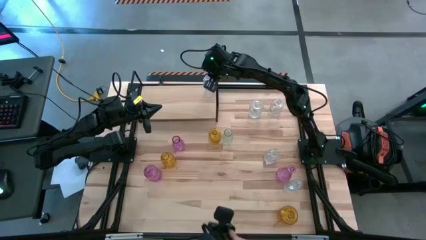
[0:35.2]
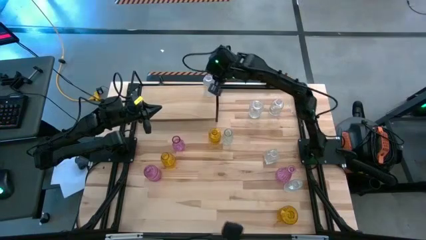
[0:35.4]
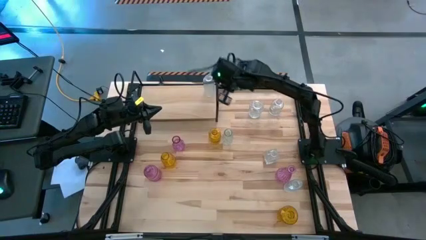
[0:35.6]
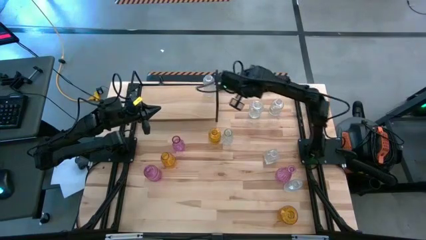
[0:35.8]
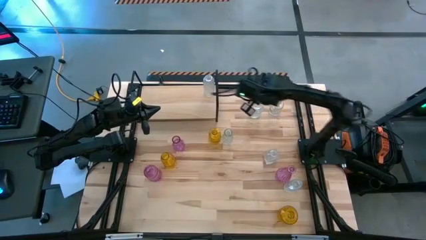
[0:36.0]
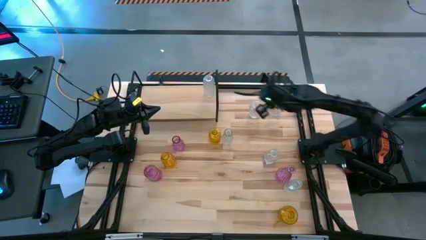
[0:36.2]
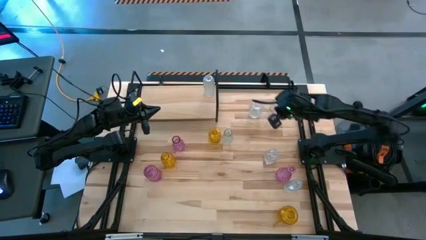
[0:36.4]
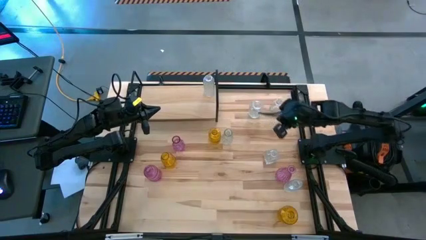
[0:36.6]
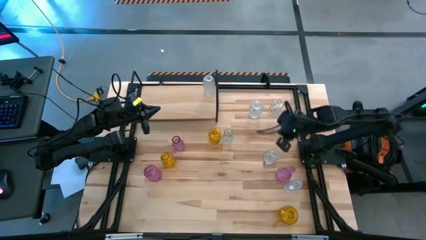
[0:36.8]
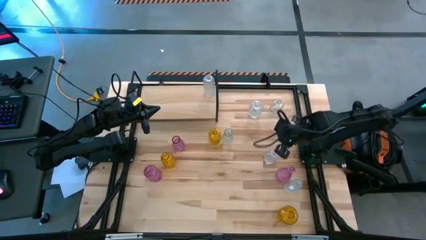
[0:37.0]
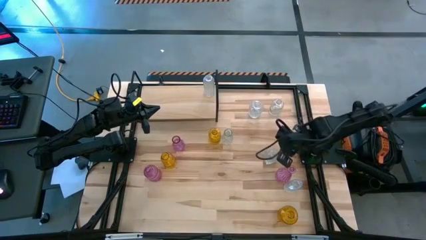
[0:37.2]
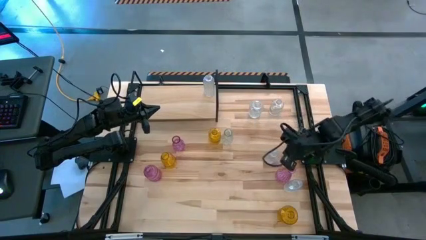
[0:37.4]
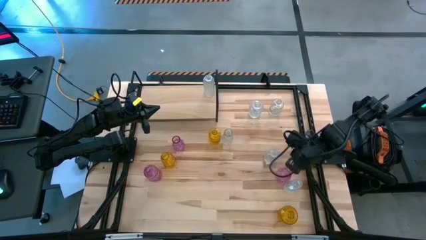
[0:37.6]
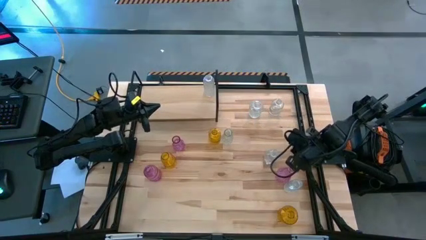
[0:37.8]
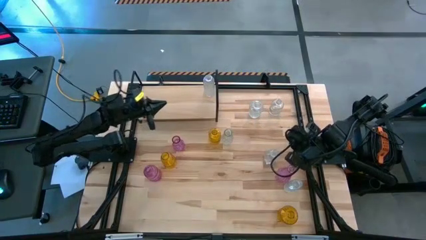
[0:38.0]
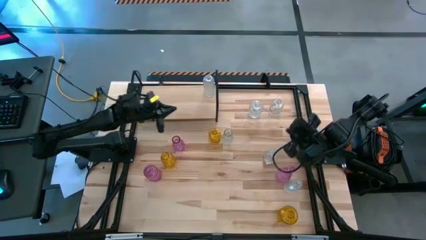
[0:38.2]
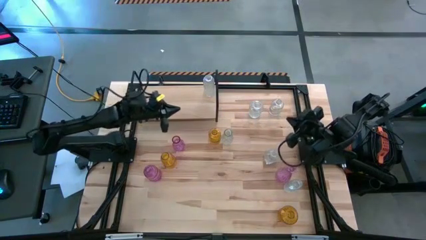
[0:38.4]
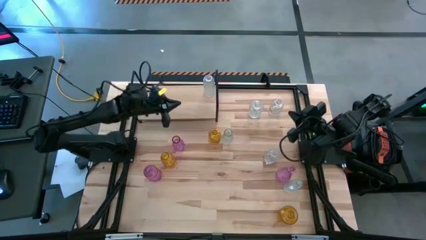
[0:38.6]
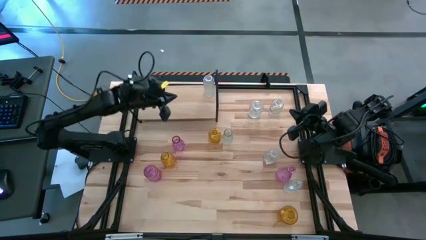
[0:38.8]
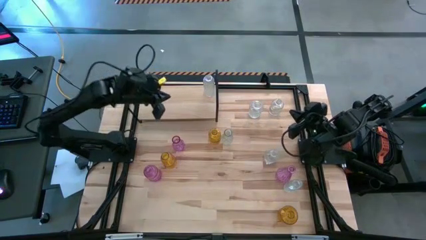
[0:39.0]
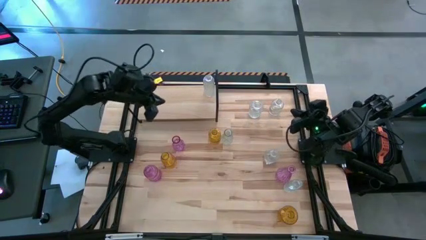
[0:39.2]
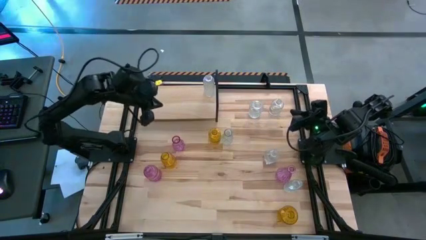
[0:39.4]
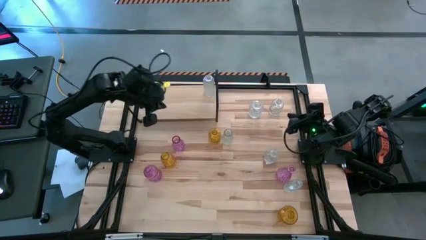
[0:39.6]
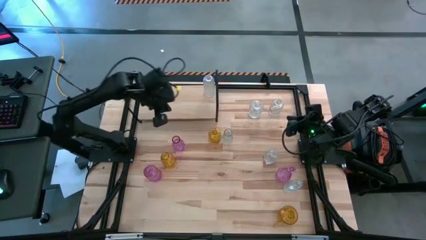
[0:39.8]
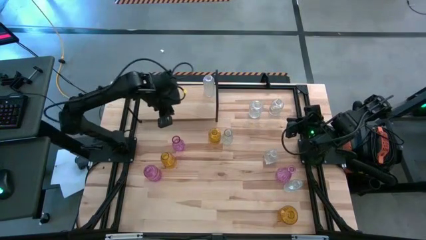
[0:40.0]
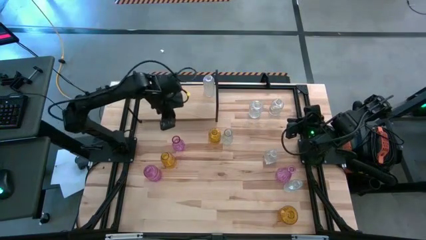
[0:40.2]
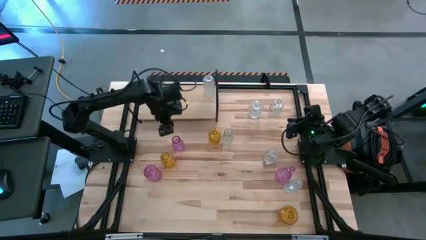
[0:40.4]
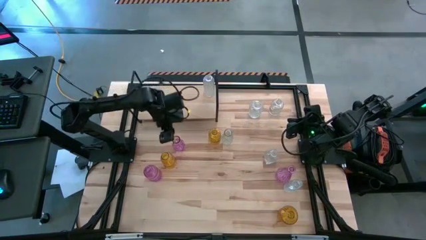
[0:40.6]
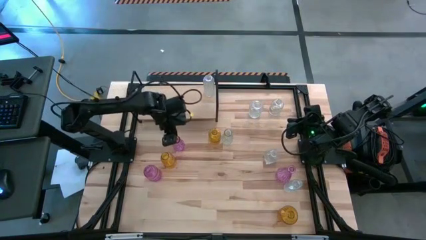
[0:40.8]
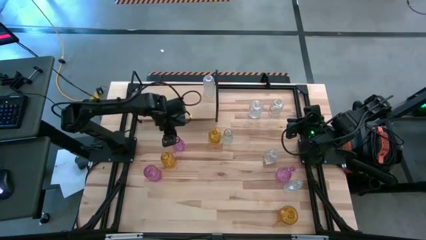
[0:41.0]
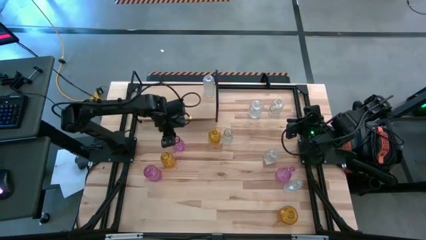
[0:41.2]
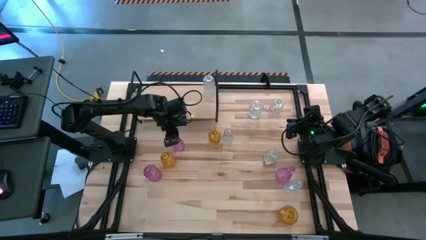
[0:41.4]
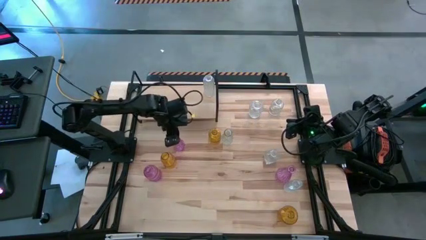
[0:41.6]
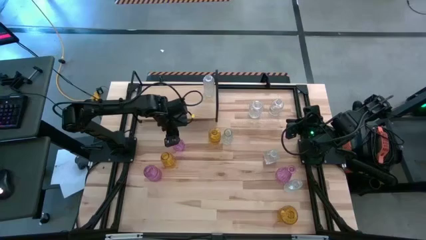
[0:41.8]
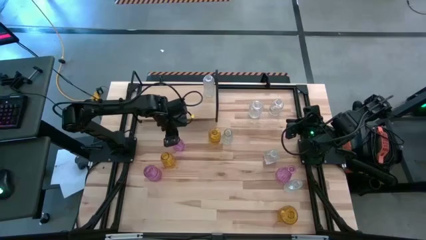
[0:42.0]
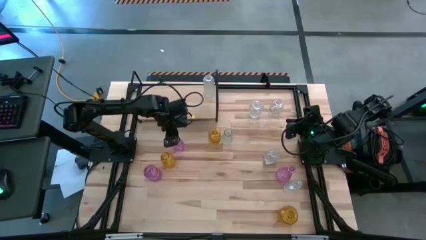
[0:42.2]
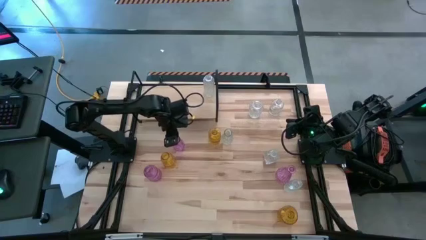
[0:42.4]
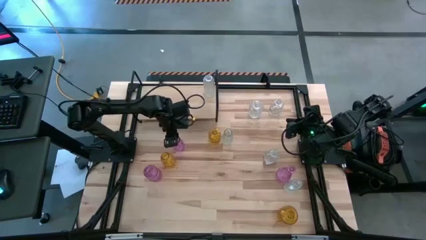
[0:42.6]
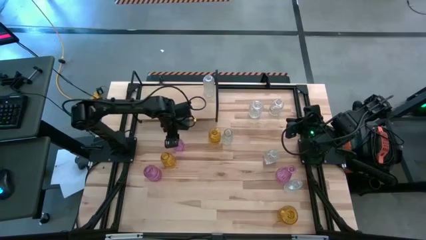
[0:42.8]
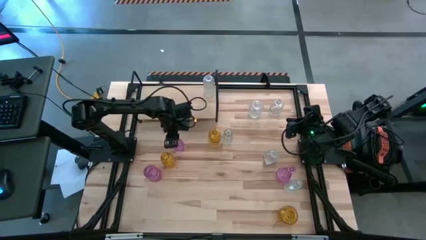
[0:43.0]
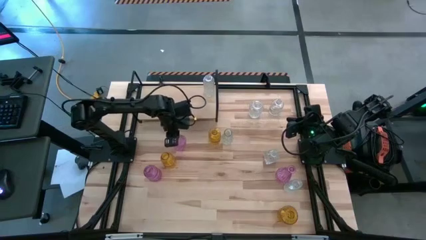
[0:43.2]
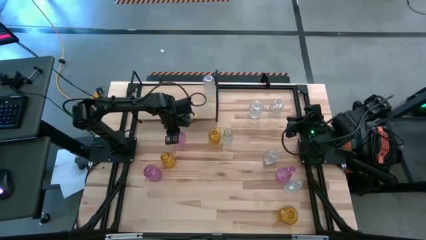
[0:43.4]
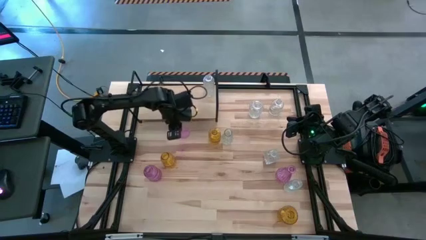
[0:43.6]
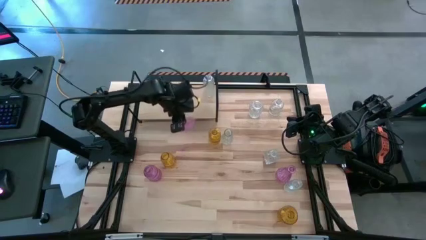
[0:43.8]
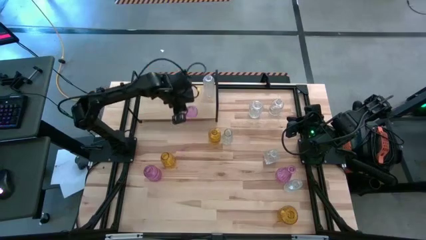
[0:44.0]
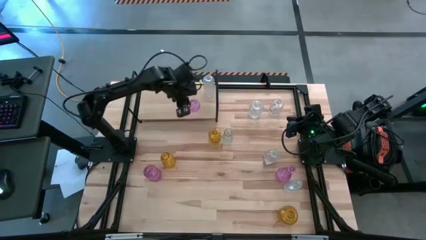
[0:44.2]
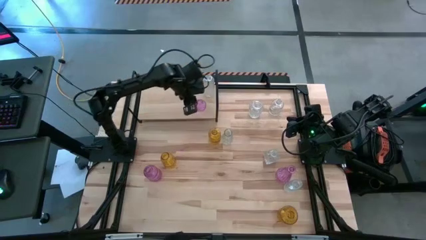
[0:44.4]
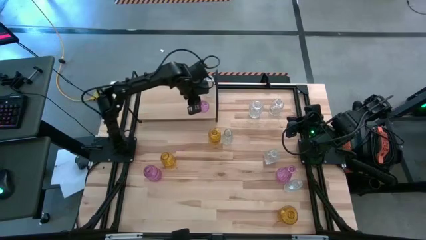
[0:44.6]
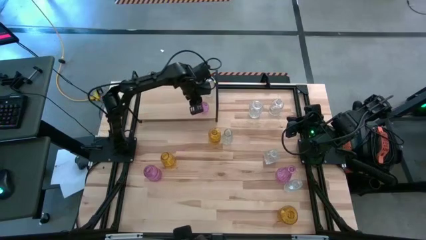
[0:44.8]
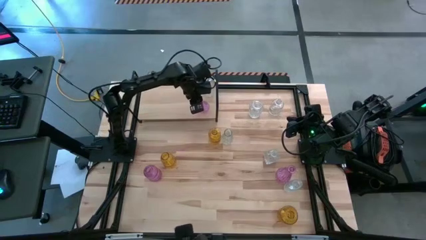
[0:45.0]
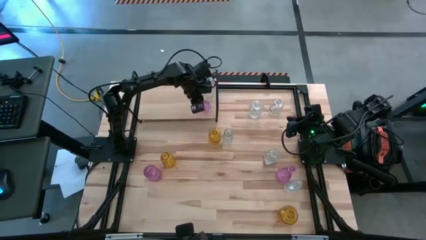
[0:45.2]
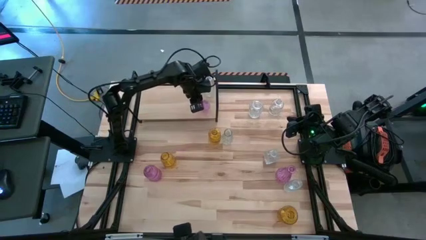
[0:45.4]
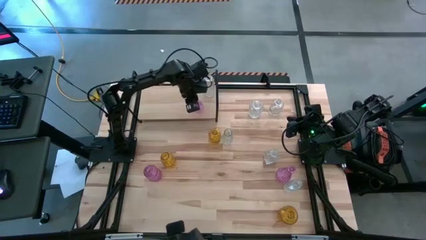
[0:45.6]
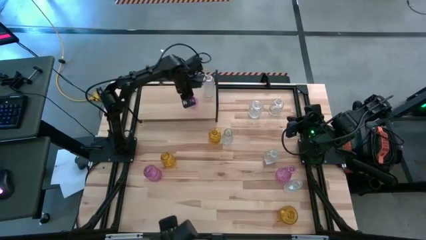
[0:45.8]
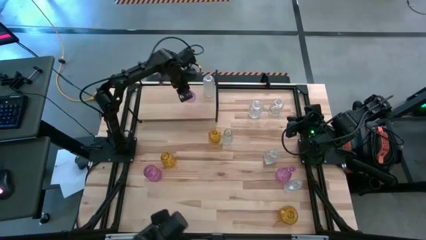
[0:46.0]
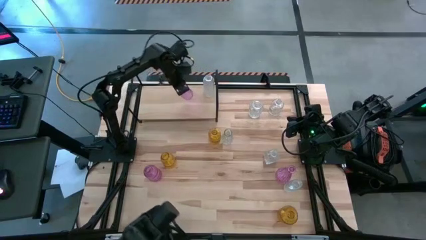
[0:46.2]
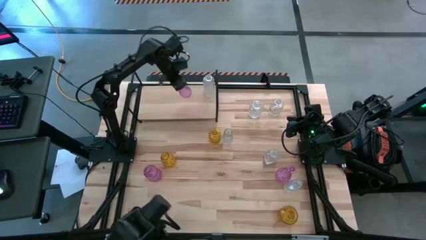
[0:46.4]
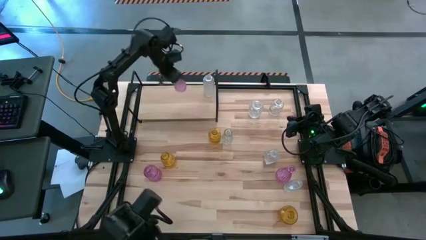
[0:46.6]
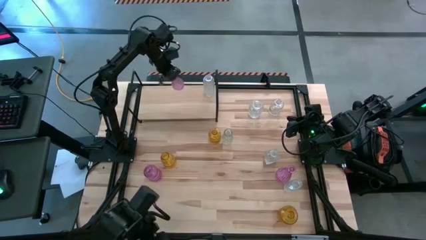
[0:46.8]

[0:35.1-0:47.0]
Task: sort vases onto shelf
Put the pink vase to the left of the transparent vase on the shelf

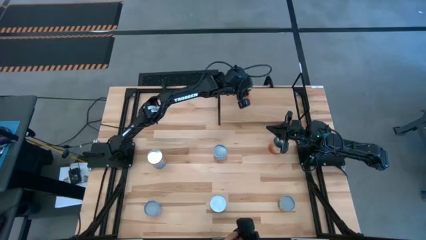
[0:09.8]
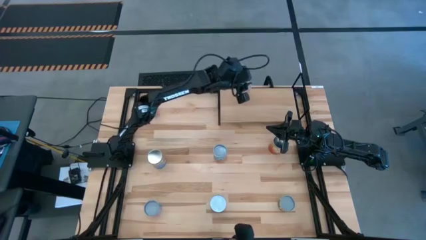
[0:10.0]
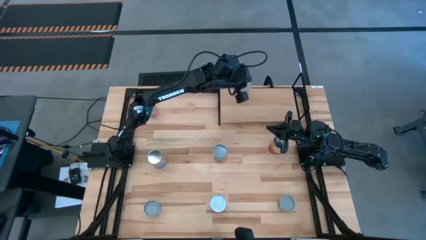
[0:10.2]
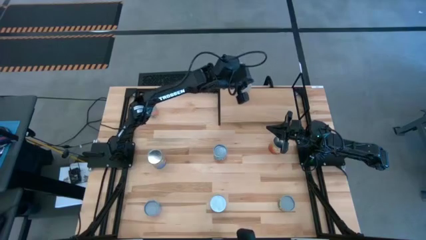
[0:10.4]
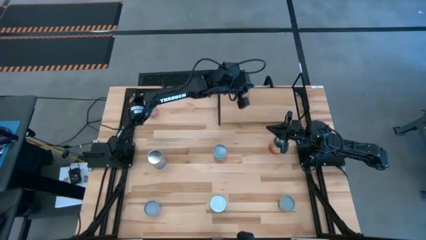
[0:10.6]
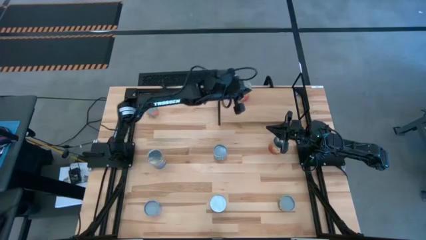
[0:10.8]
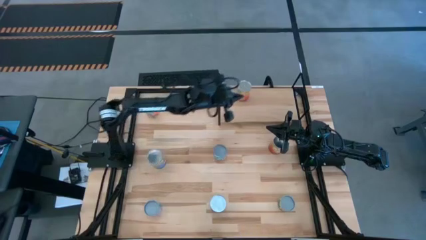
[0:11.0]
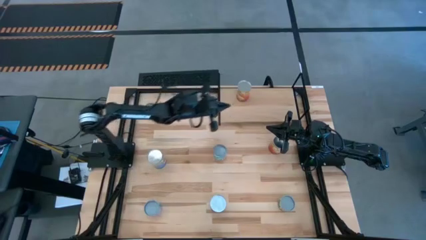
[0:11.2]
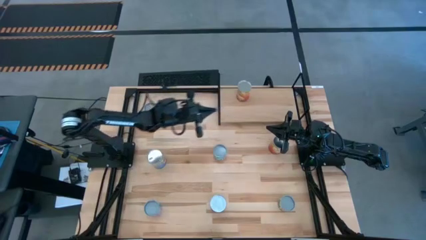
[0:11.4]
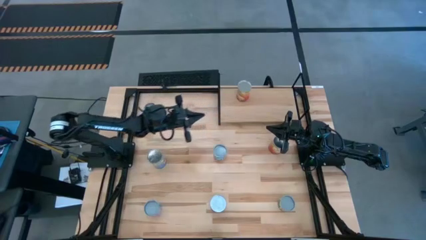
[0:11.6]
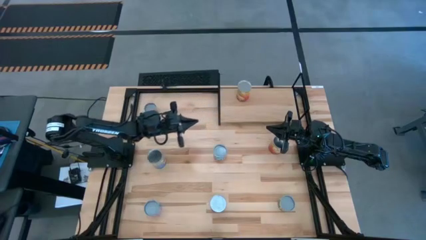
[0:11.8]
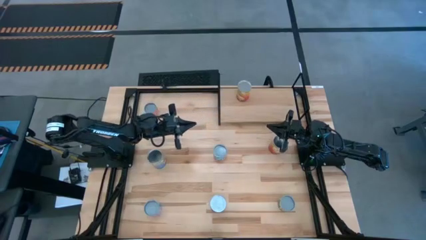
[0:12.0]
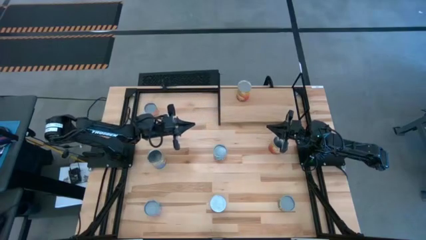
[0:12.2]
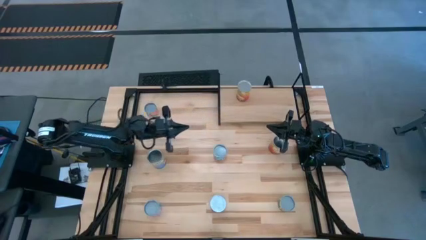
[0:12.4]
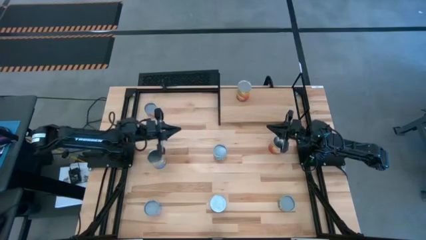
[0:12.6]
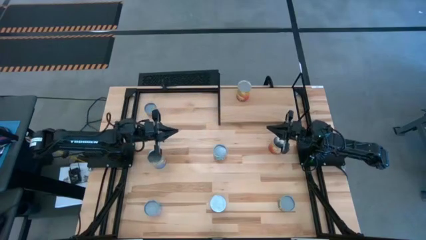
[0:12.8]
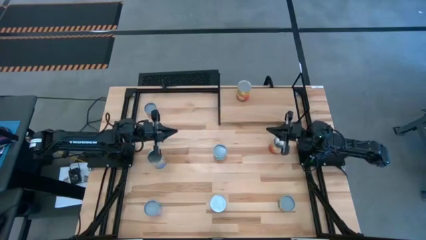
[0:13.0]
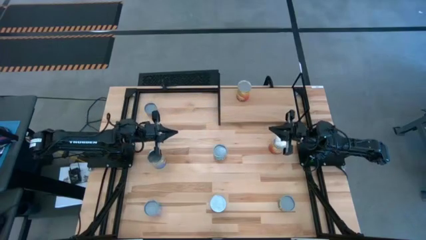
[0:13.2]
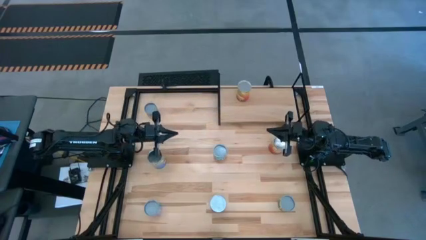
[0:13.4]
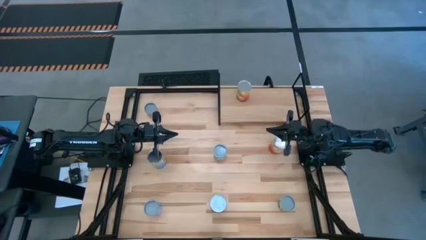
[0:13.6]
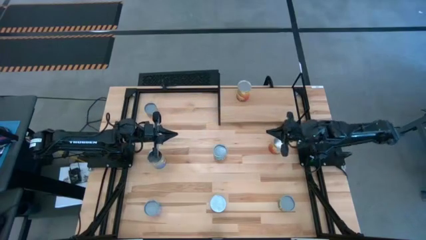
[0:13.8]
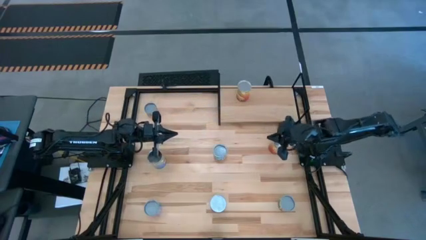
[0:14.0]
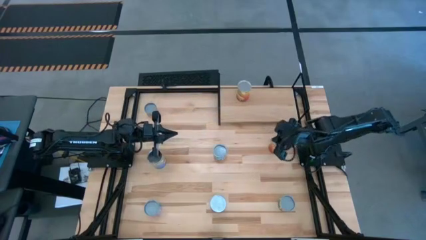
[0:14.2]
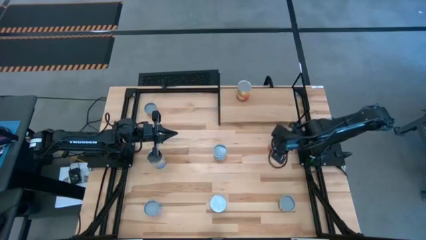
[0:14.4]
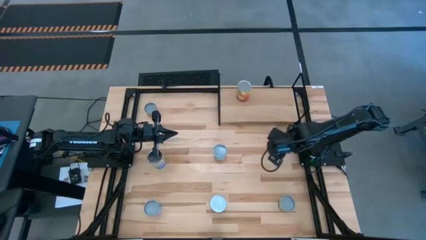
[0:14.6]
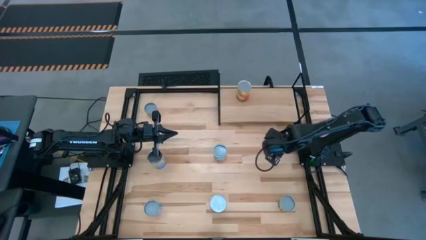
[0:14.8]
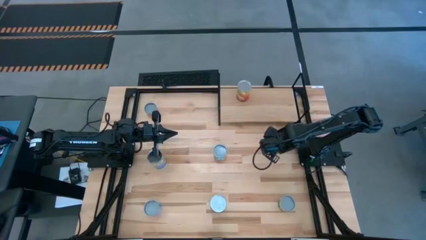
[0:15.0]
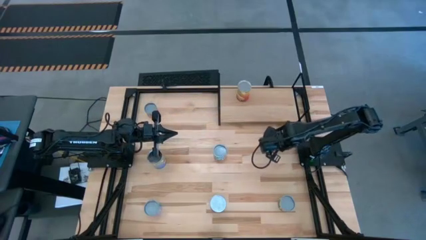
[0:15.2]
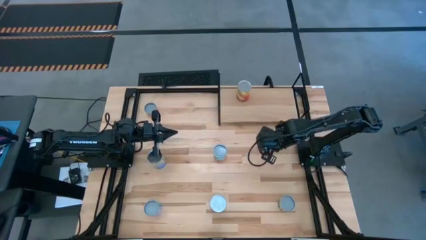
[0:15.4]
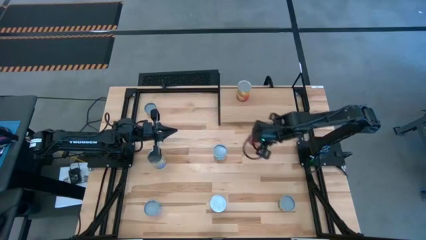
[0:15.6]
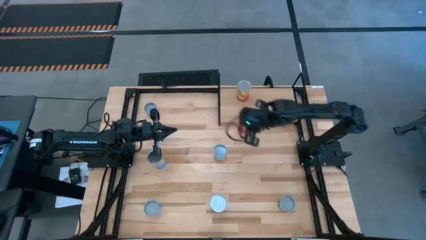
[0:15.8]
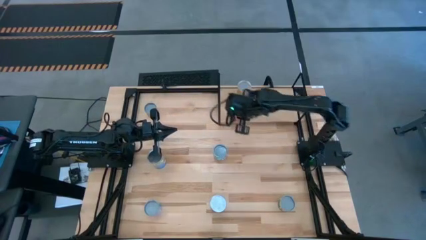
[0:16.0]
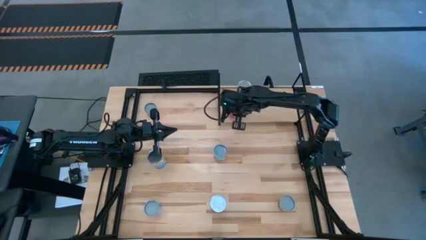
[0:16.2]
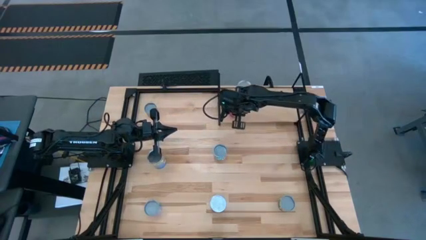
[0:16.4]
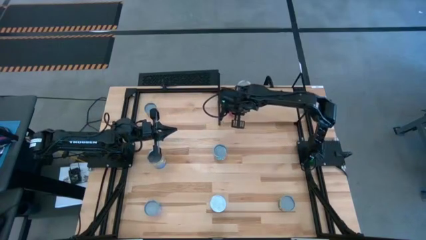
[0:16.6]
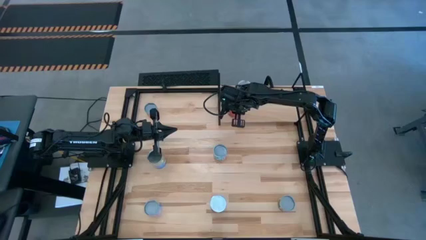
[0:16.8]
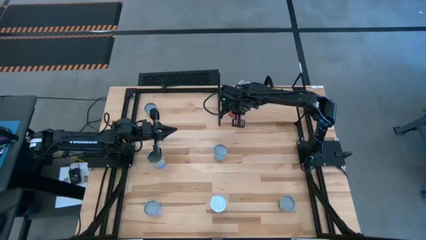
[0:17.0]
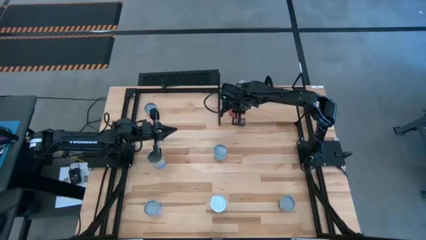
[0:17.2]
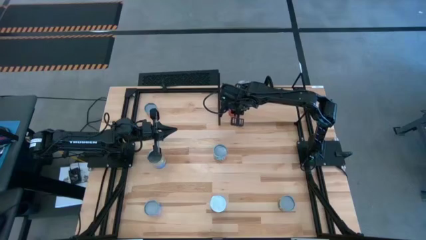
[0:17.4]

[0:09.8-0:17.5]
Task: Pick and place cans onto a shelf
Put the large canned corn on the shelf aligned with the other large canned corn
